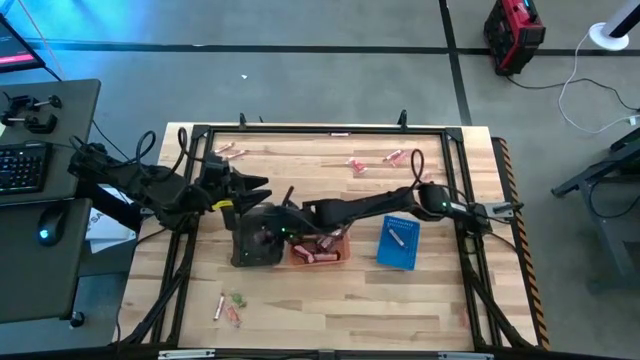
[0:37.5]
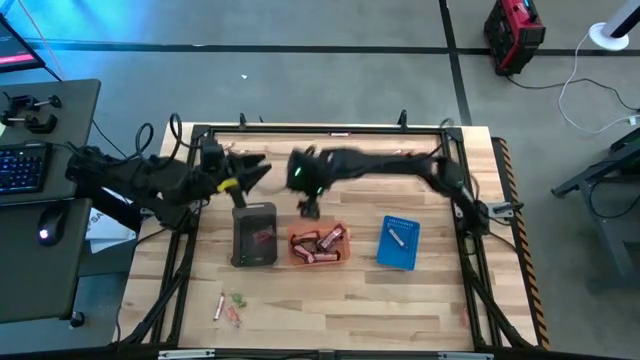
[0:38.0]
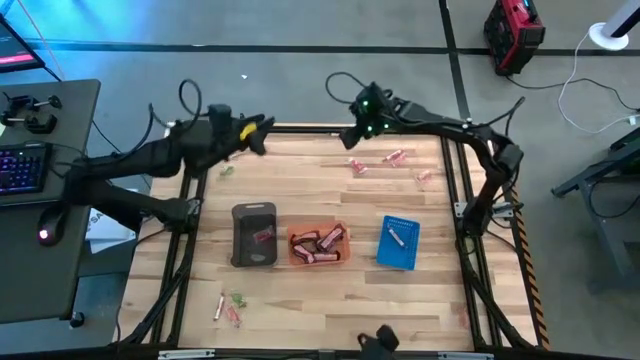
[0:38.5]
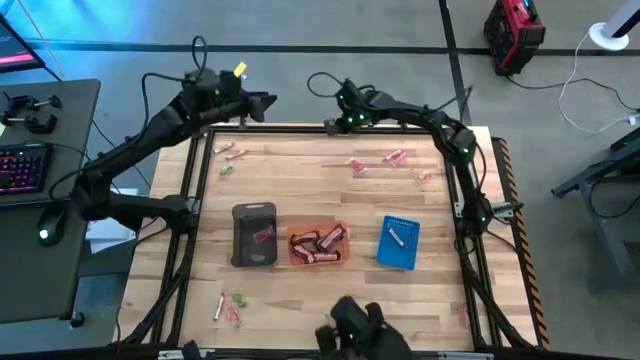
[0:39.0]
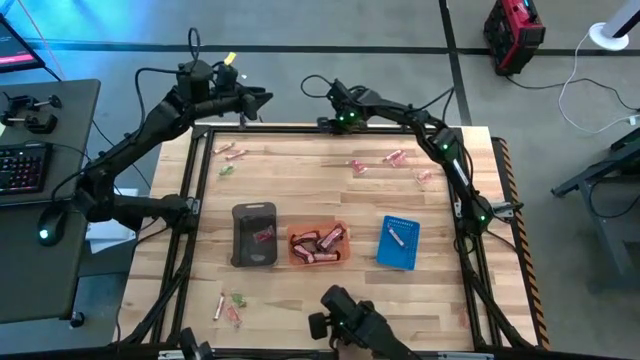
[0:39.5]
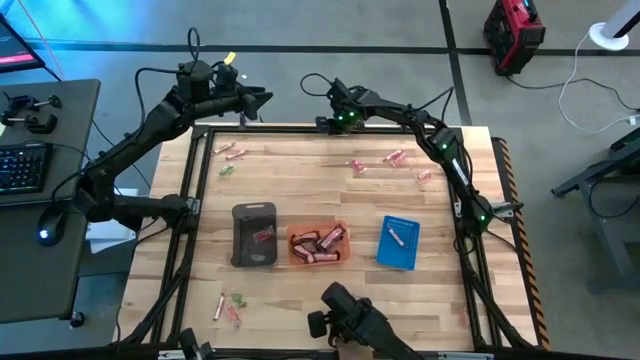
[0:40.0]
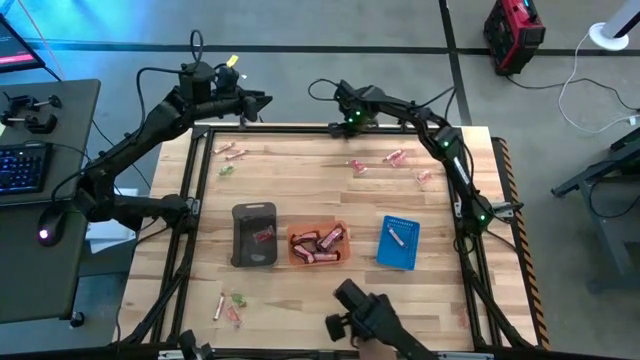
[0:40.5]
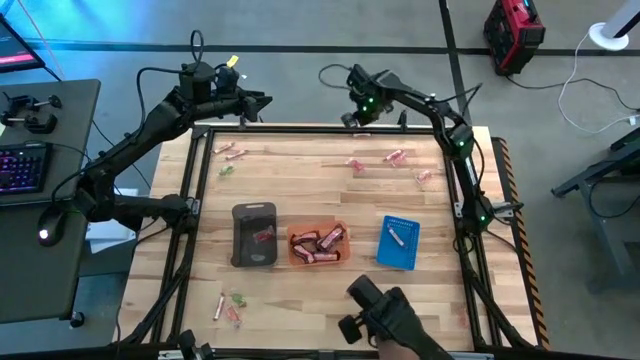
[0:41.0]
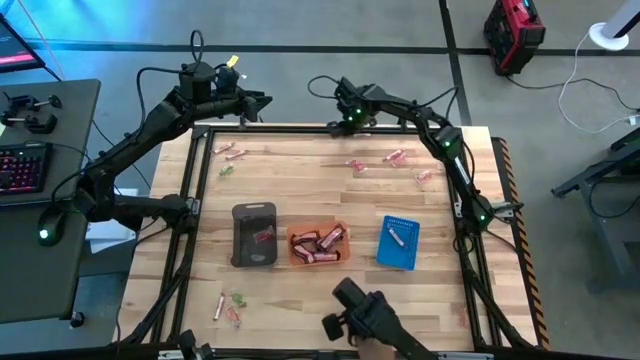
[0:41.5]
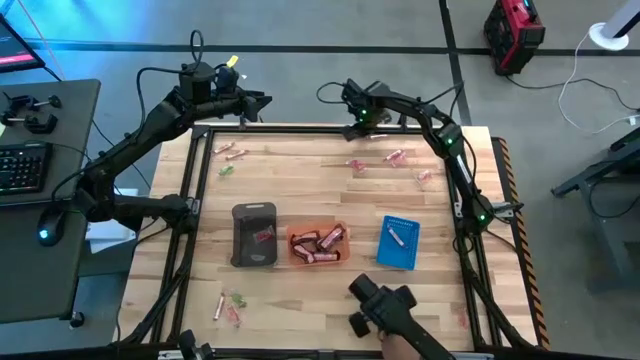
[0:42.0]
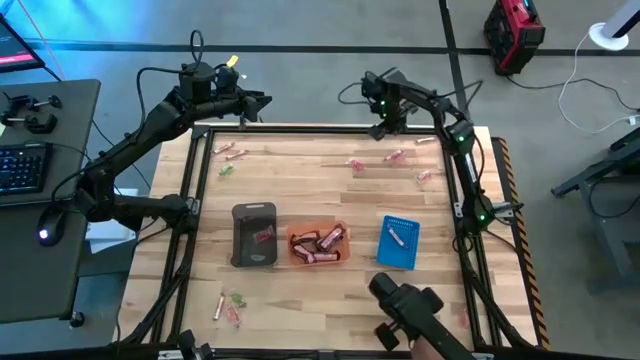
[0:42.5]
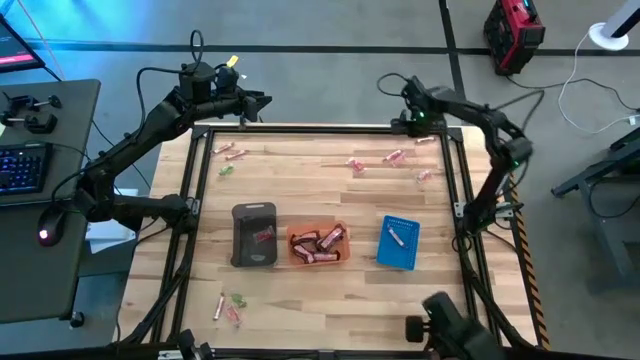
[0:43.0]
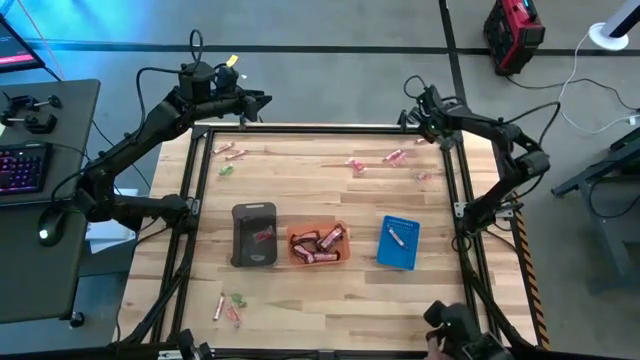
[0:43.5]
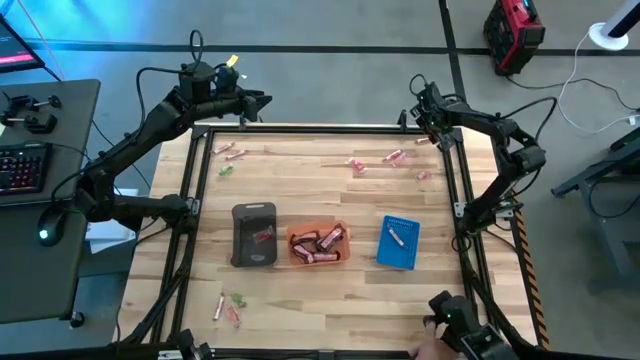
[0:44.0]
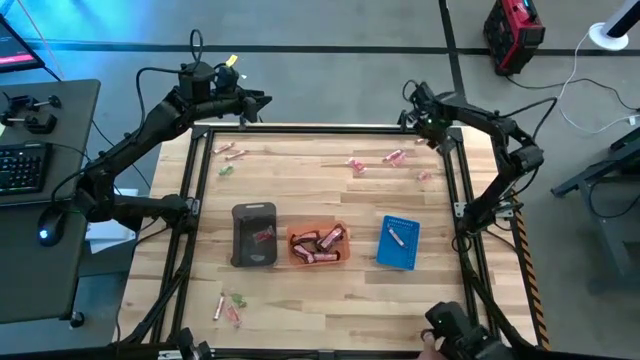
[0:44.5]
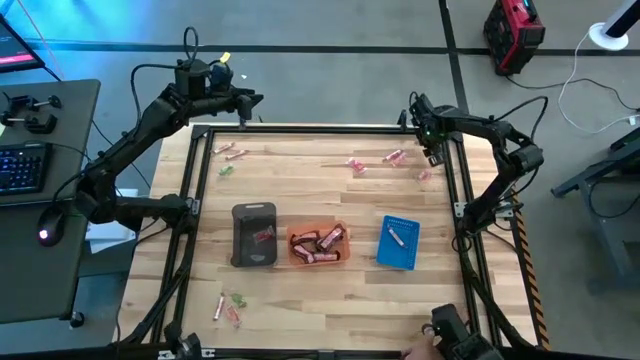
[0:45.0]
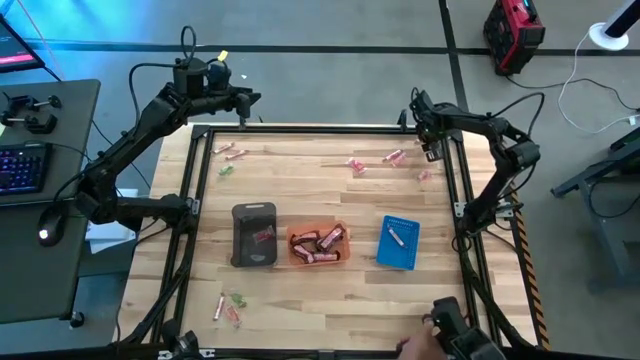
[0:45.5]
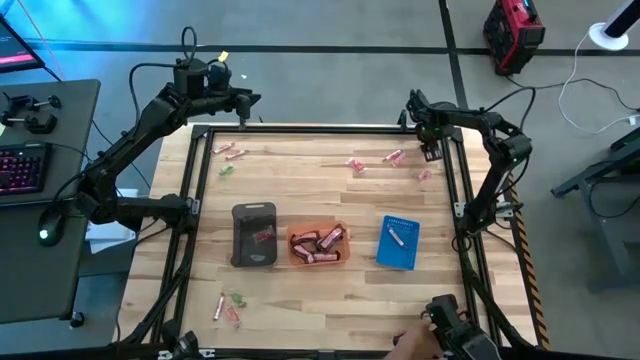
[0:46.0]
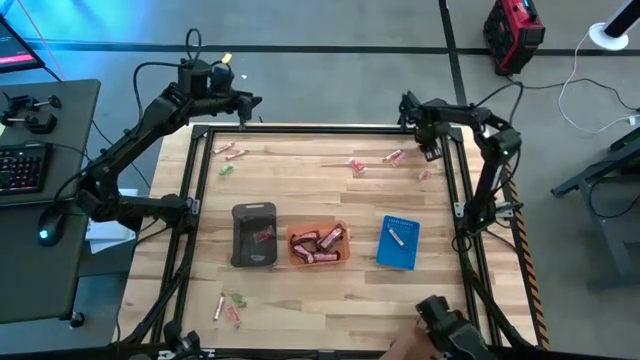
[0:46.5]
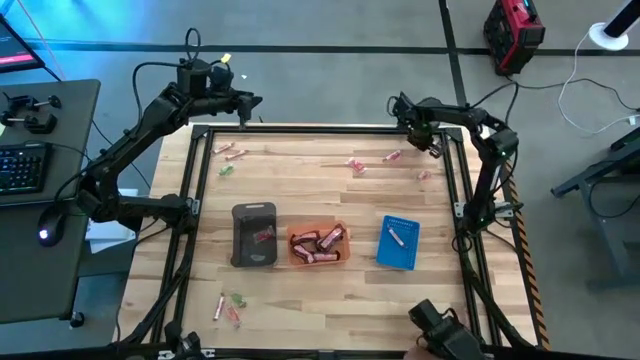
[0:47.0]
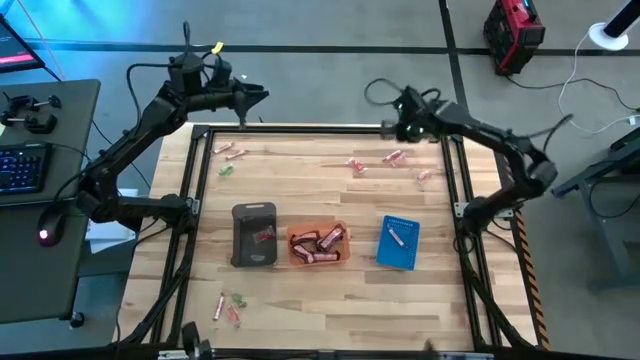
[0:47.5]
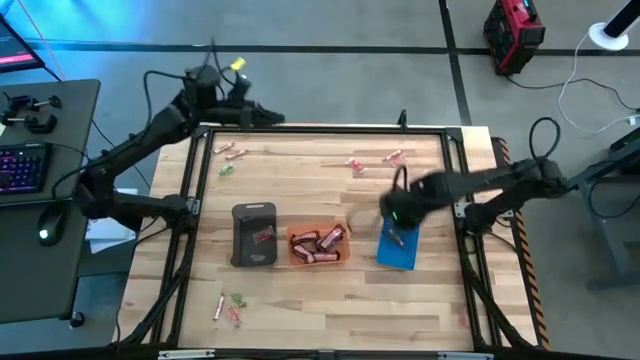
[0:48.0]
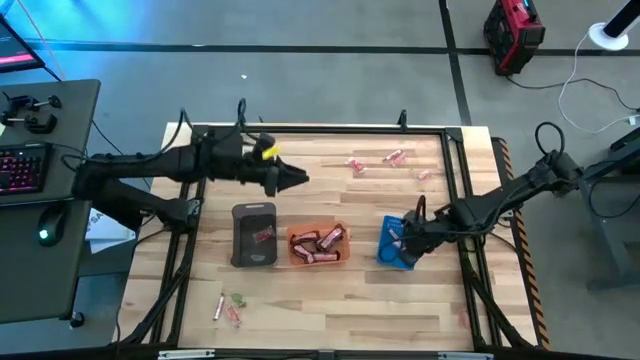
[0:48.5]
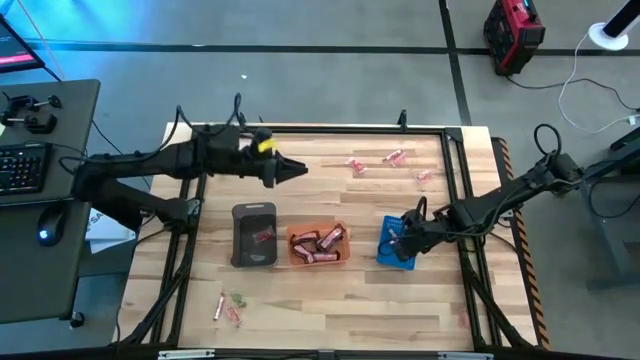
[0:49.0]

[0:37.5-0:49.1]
Task: Sort candy by brand, put in halloween buckets
Put the white candy stick into the blue bin

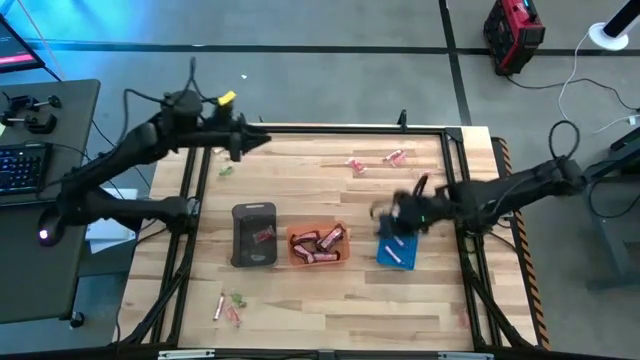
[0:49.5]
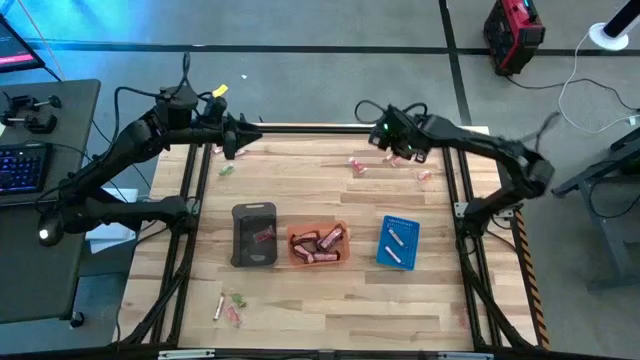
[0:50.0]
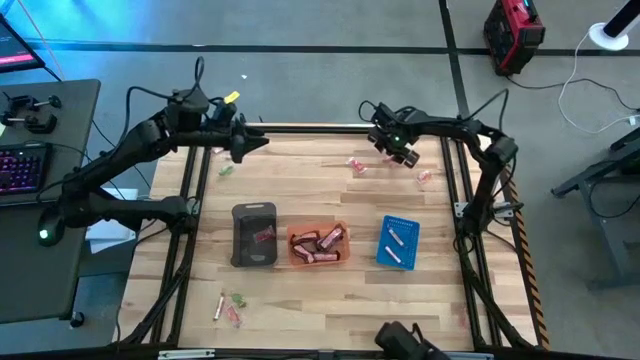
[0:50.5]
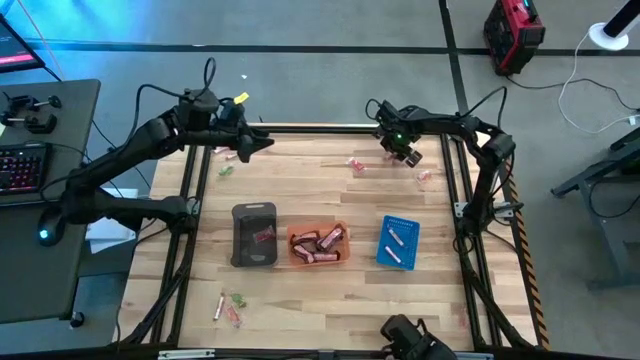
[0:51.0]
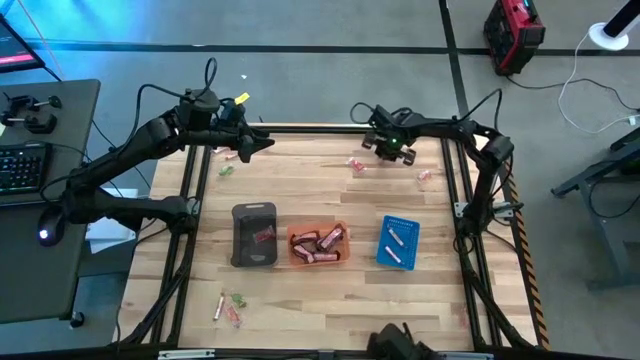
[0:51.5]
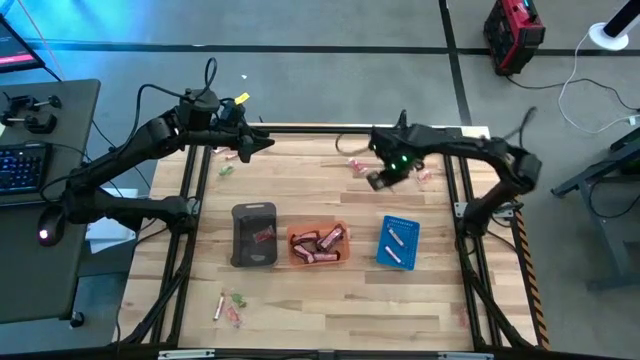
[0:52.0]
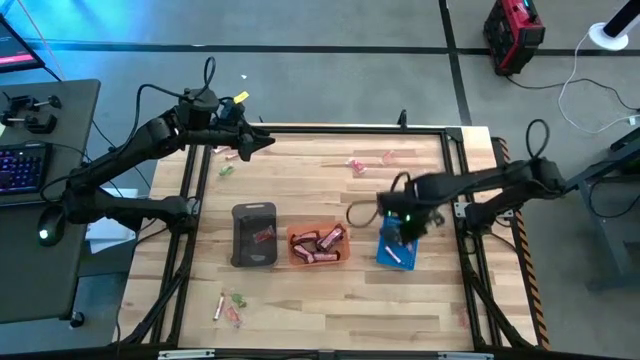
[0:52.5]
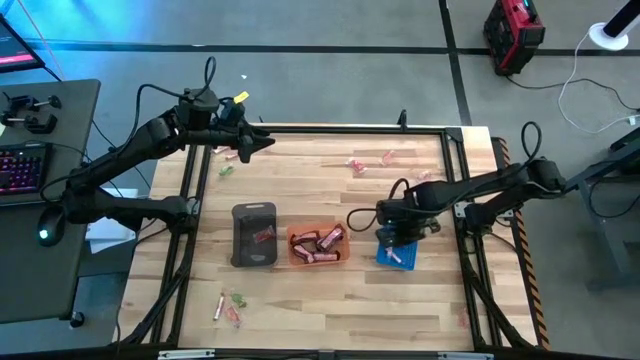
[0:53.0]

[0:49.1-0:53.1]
Put the white candy stick into the blue bin

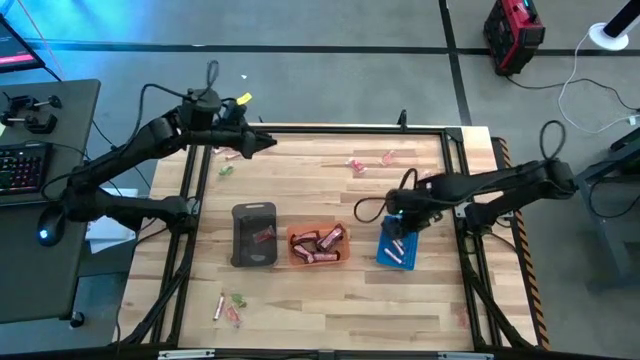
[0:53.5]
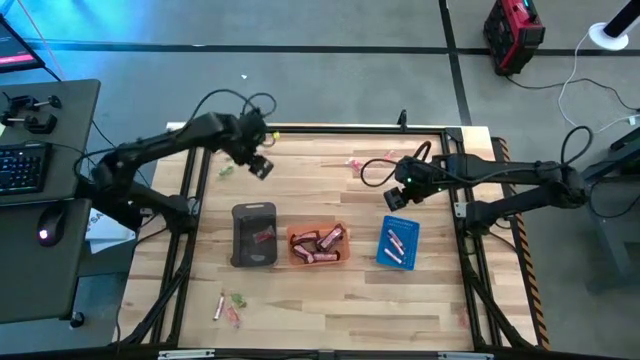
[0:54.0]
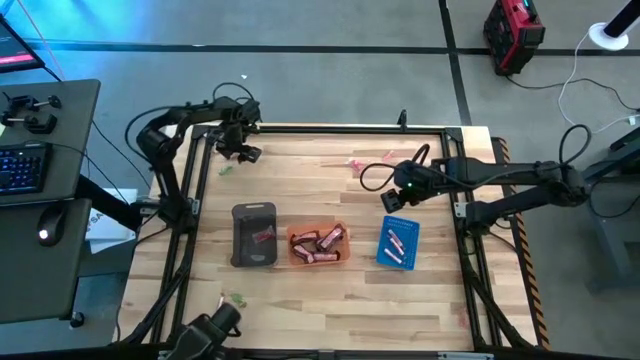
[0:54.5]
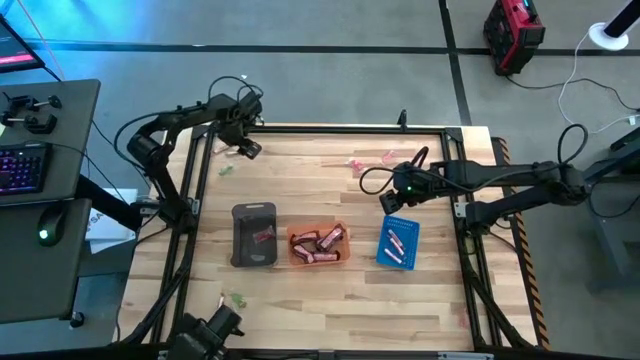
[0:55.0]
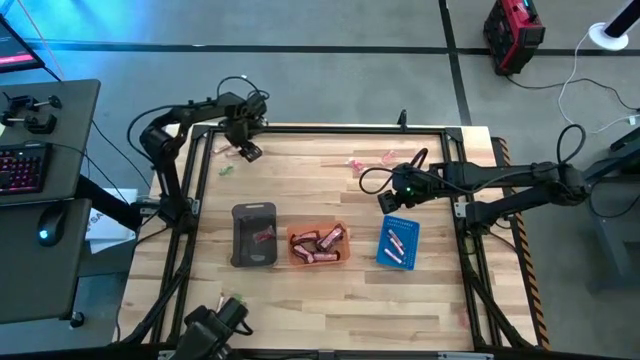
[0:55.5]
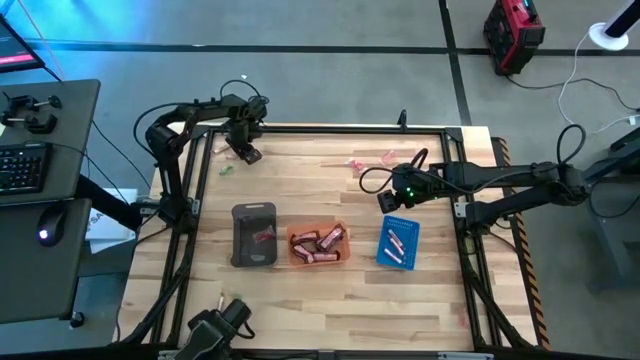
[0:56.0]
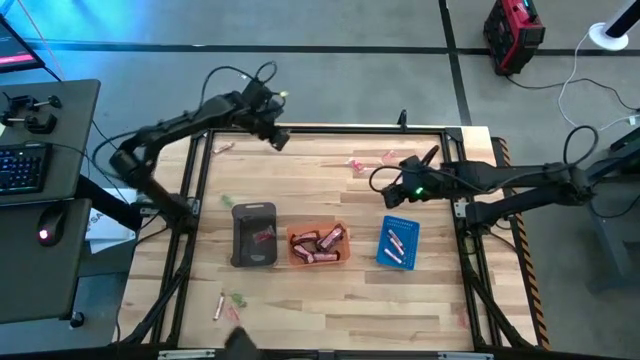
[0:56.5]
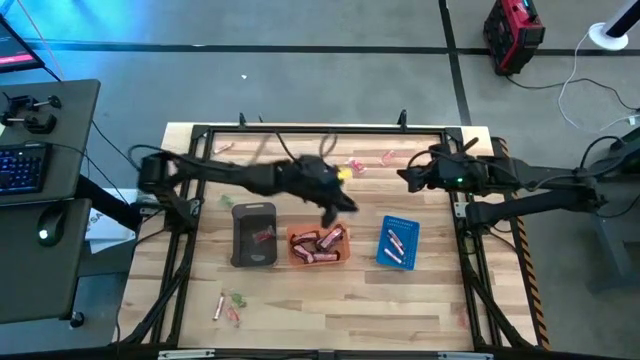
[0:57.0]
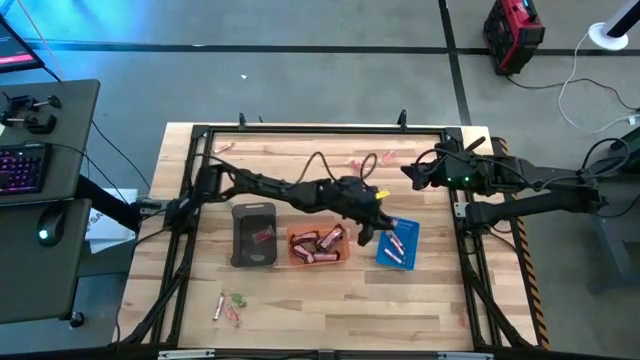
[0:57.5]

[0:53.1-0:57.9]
Put the white candy stick into the blue bin

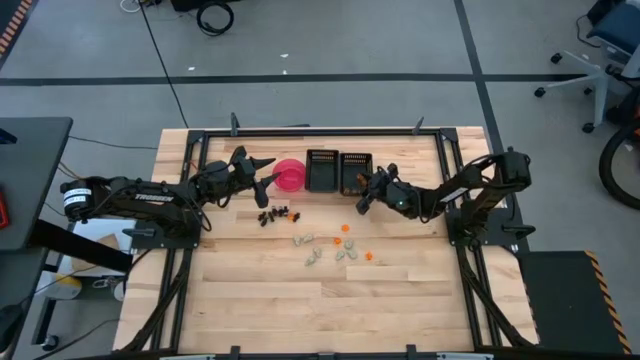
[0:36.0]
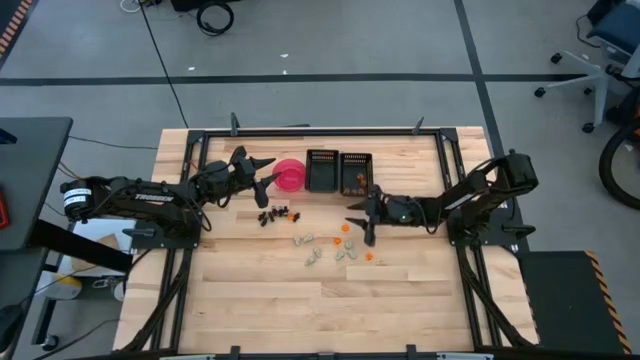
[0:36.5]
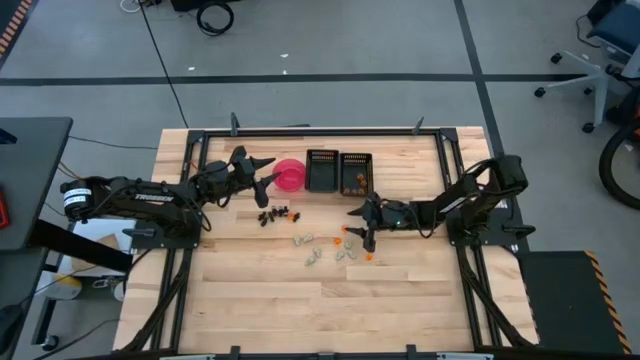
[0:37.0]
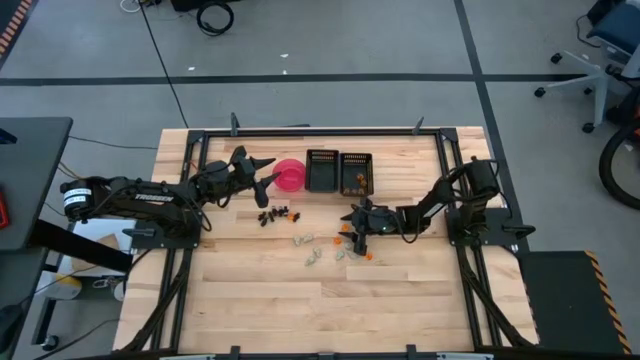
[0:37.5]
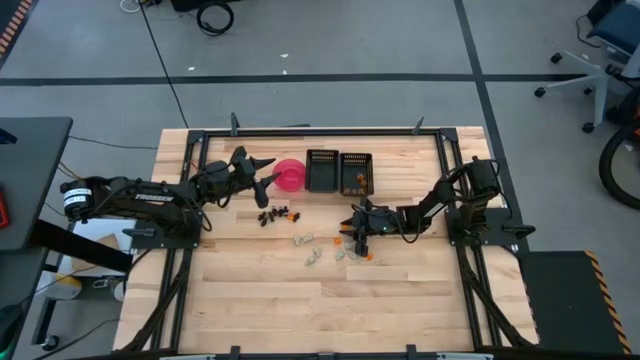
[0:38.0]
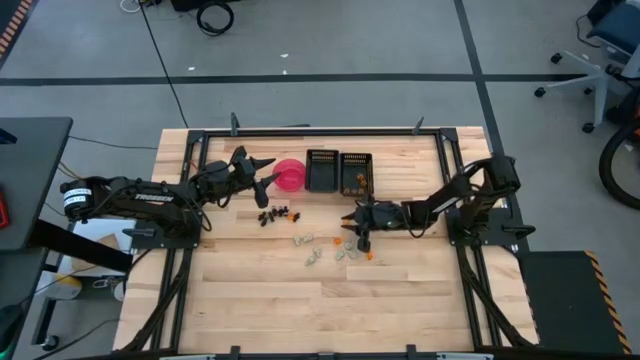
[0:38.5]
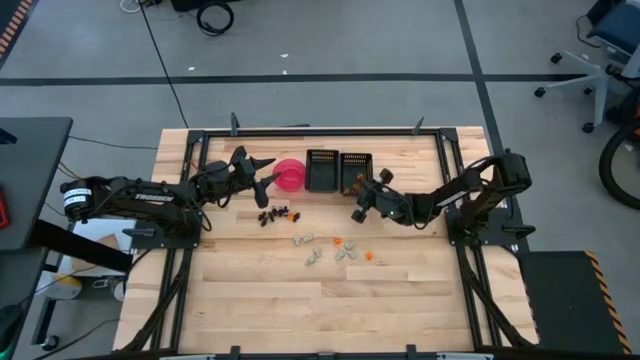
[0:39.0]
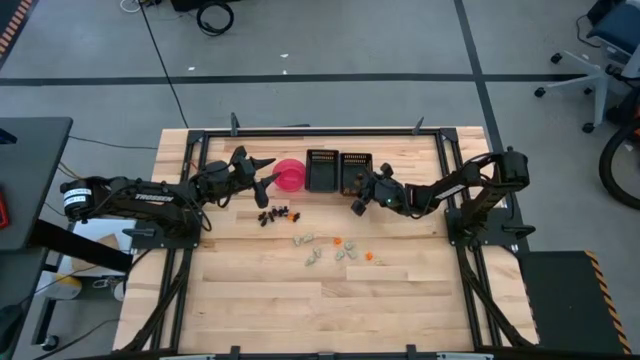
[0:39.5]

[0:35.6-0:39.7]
Task: Sort Halloween decoration
Put the orange pumpkin toy into the right black bin
